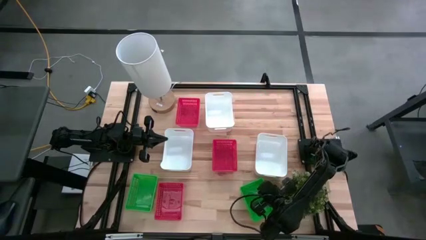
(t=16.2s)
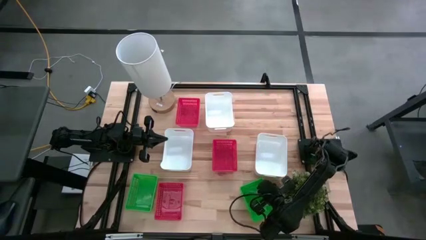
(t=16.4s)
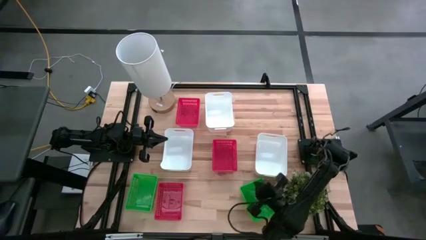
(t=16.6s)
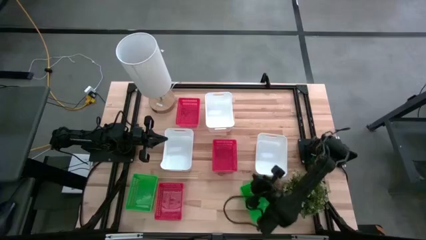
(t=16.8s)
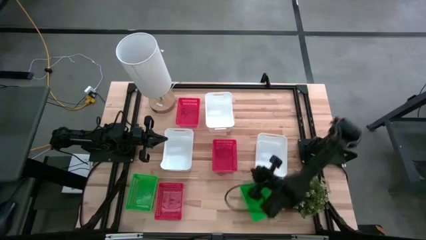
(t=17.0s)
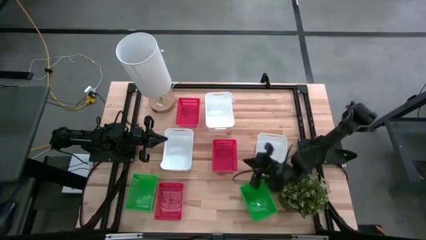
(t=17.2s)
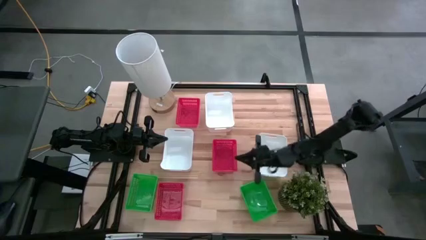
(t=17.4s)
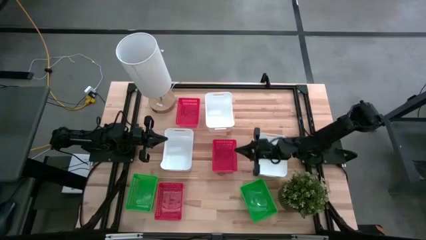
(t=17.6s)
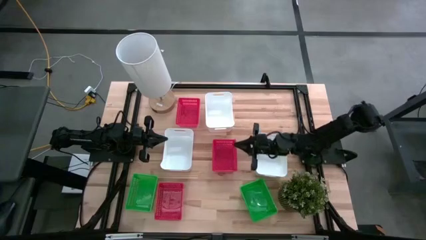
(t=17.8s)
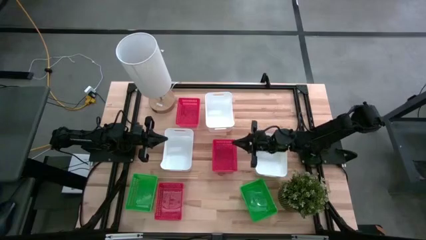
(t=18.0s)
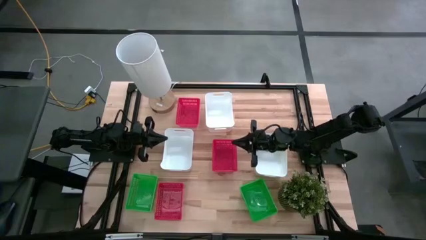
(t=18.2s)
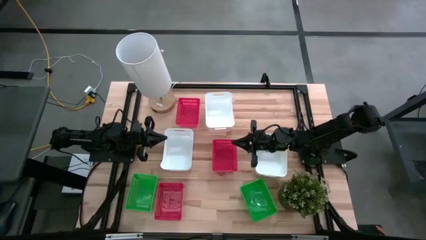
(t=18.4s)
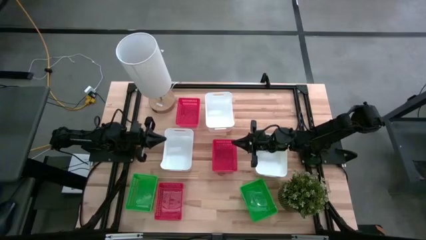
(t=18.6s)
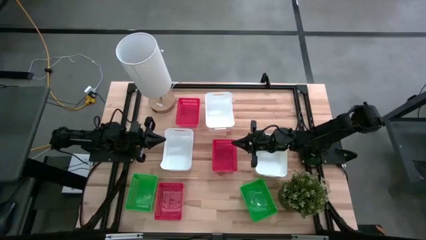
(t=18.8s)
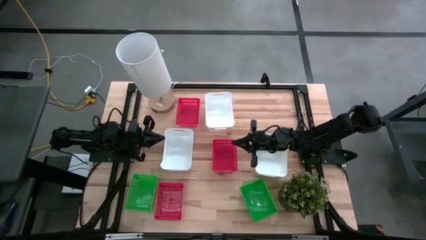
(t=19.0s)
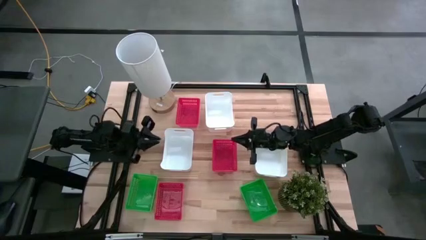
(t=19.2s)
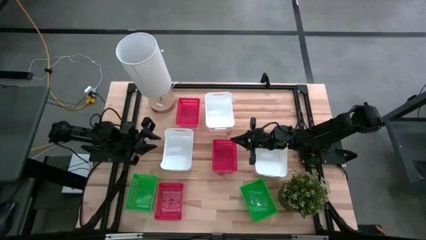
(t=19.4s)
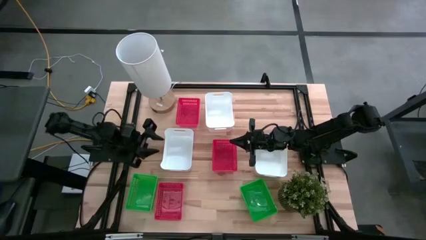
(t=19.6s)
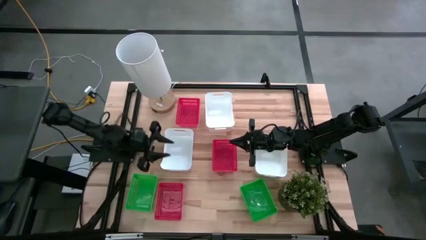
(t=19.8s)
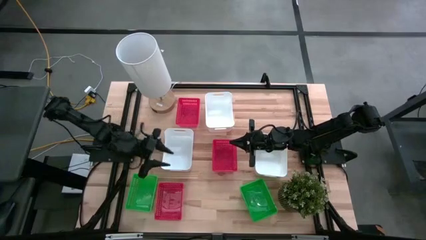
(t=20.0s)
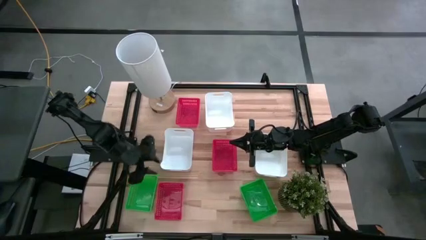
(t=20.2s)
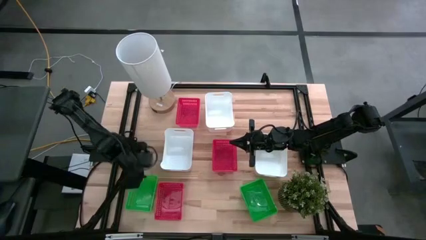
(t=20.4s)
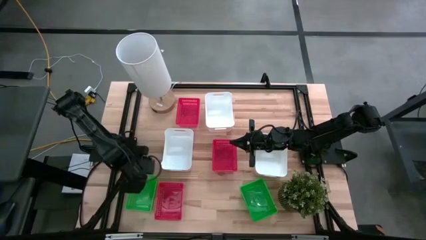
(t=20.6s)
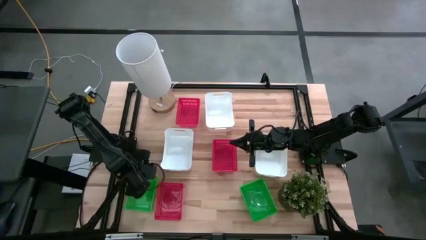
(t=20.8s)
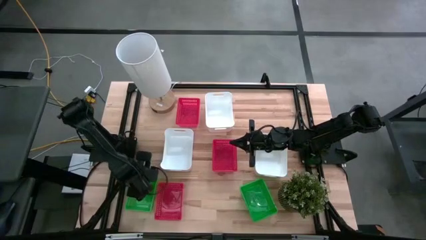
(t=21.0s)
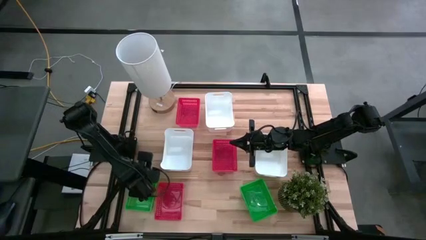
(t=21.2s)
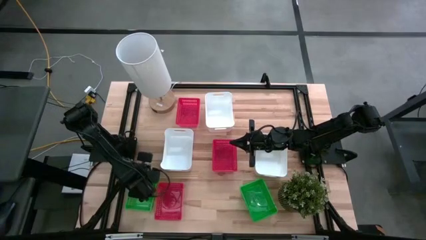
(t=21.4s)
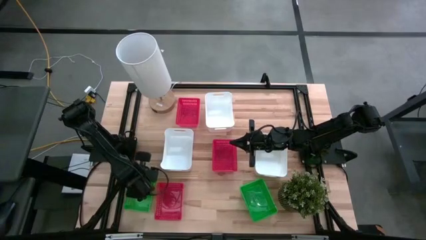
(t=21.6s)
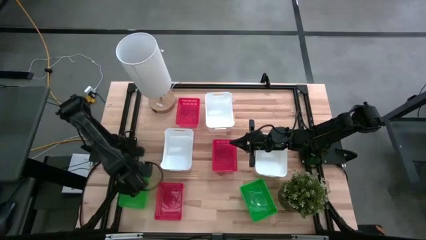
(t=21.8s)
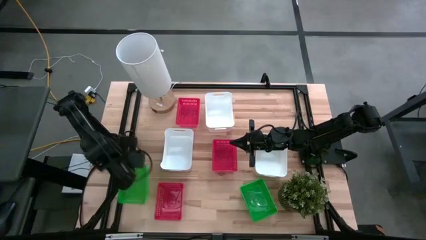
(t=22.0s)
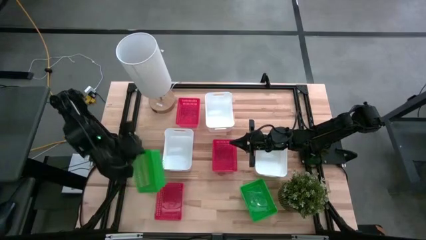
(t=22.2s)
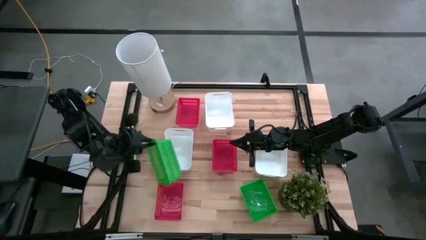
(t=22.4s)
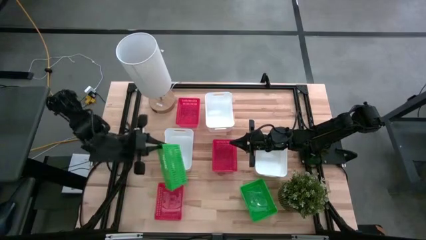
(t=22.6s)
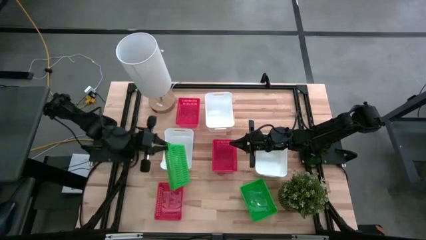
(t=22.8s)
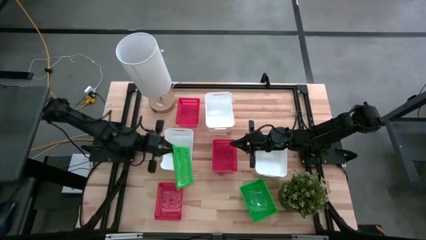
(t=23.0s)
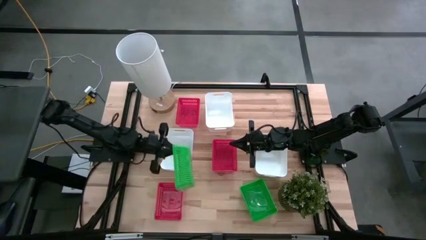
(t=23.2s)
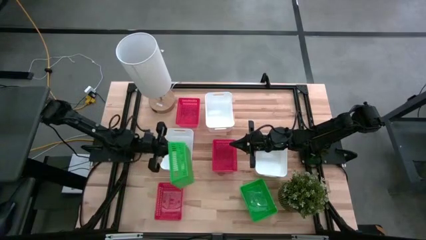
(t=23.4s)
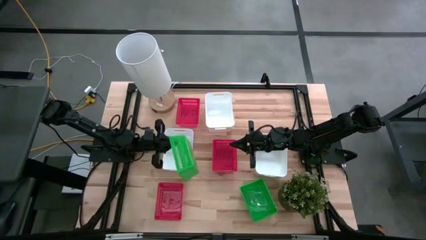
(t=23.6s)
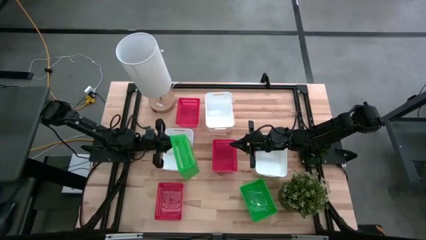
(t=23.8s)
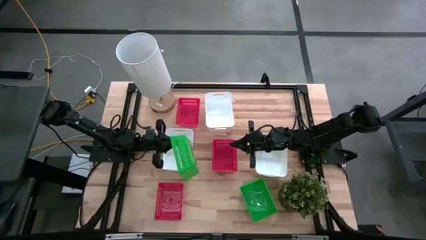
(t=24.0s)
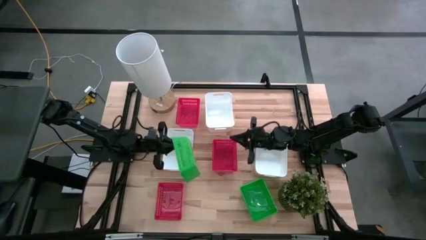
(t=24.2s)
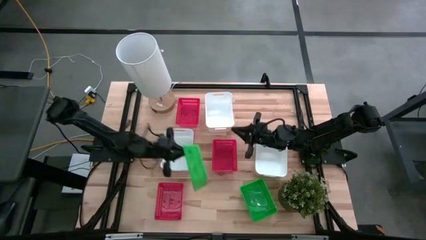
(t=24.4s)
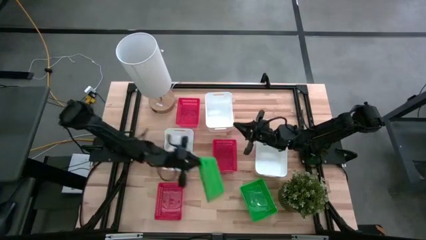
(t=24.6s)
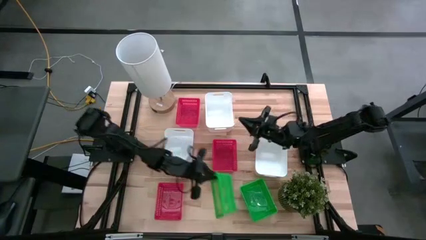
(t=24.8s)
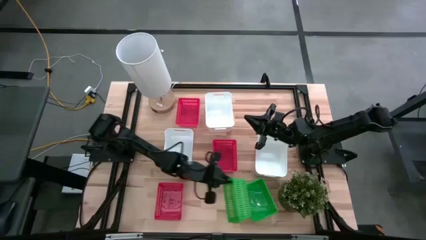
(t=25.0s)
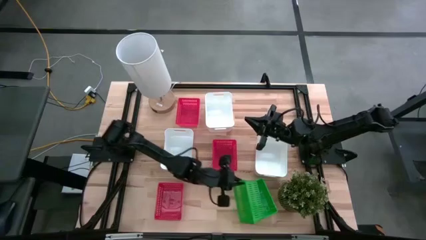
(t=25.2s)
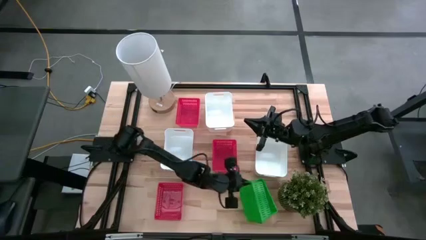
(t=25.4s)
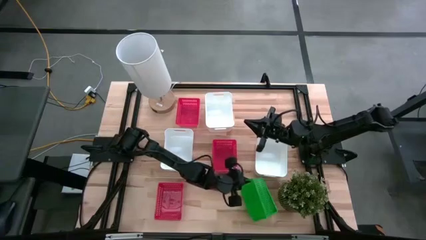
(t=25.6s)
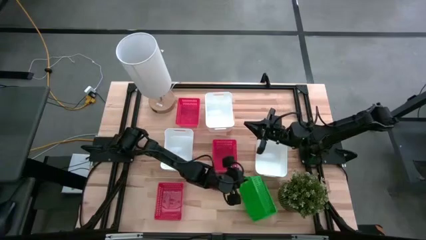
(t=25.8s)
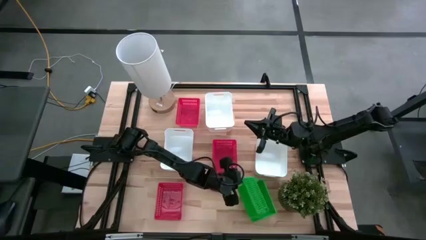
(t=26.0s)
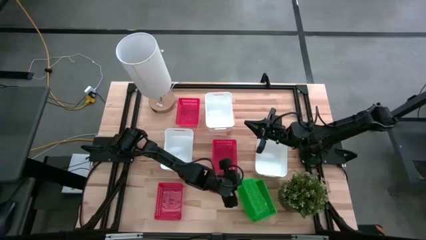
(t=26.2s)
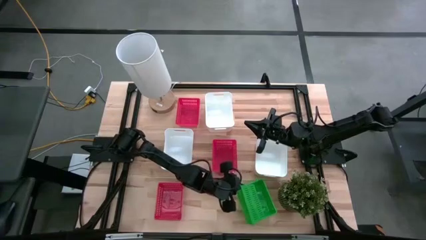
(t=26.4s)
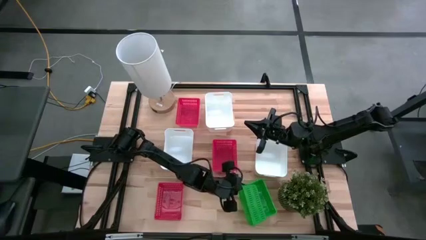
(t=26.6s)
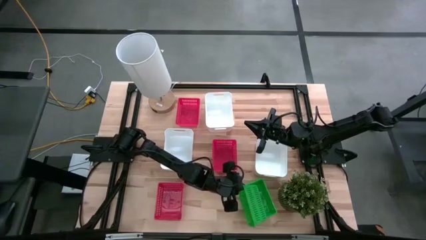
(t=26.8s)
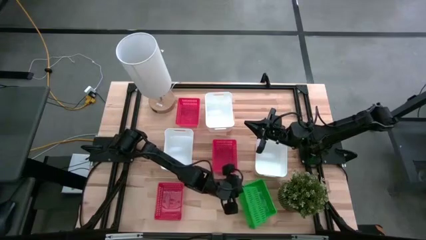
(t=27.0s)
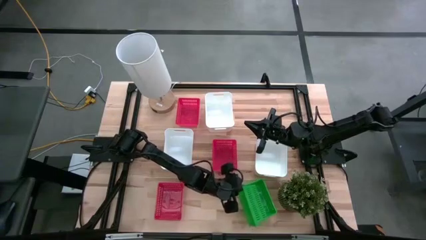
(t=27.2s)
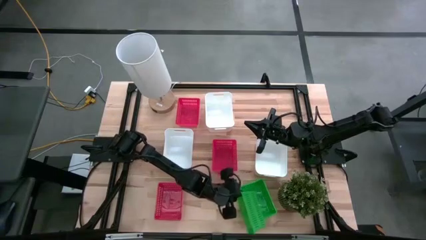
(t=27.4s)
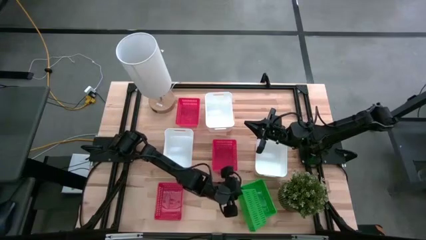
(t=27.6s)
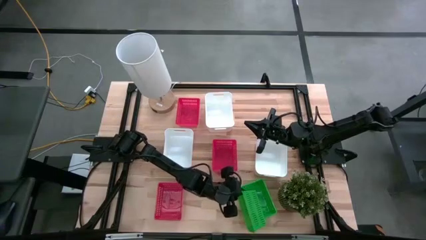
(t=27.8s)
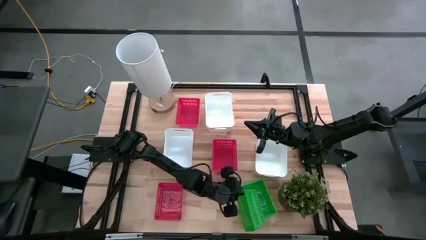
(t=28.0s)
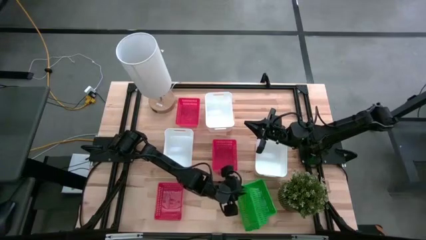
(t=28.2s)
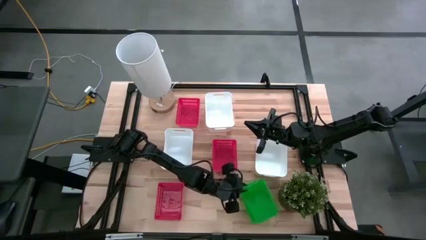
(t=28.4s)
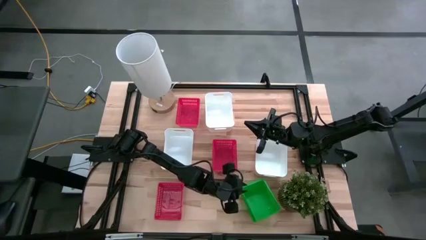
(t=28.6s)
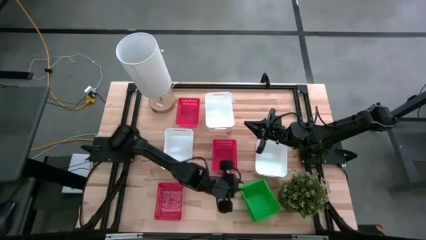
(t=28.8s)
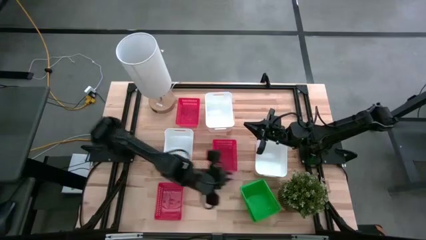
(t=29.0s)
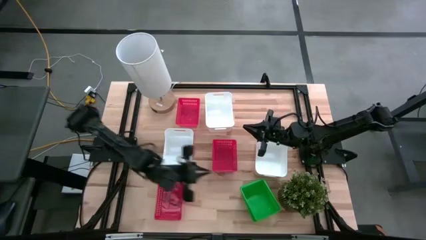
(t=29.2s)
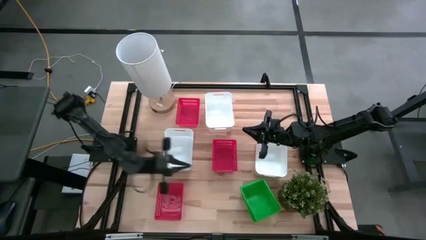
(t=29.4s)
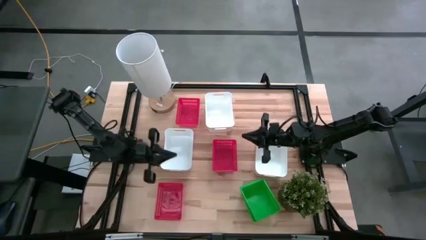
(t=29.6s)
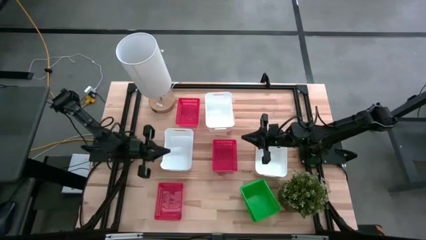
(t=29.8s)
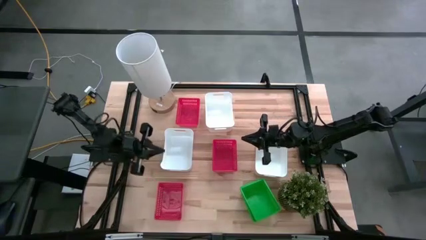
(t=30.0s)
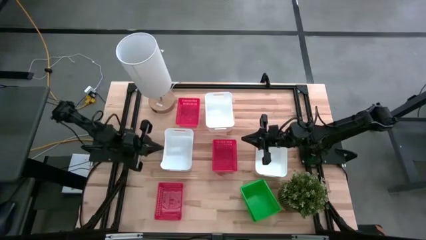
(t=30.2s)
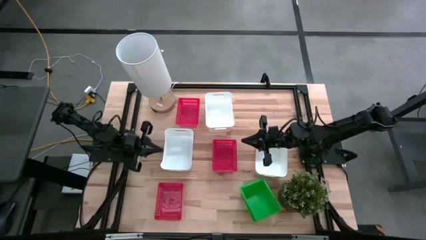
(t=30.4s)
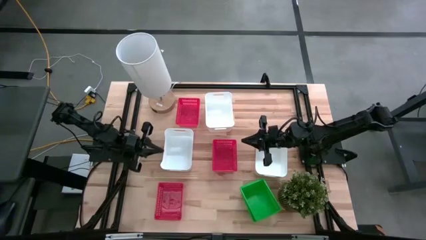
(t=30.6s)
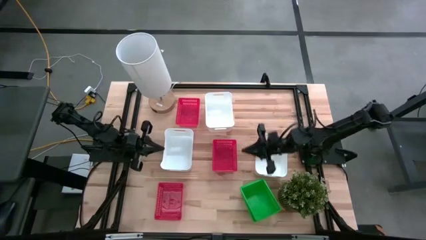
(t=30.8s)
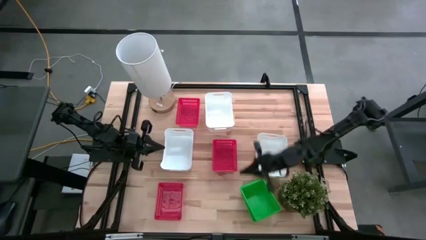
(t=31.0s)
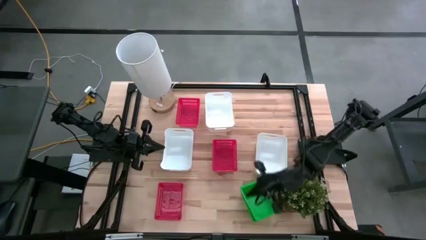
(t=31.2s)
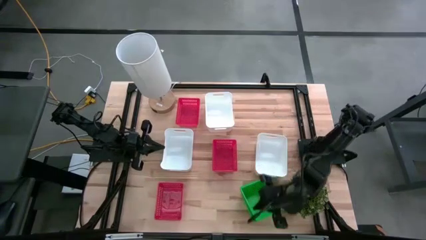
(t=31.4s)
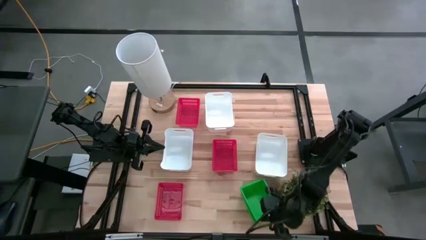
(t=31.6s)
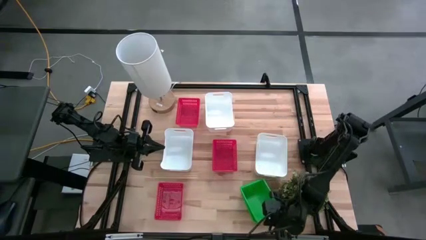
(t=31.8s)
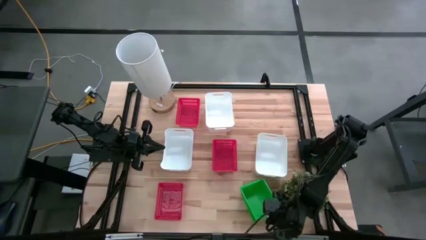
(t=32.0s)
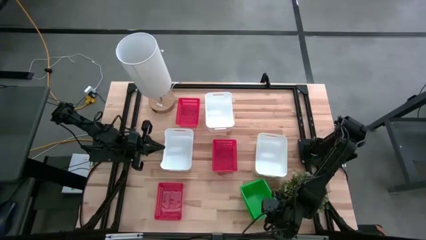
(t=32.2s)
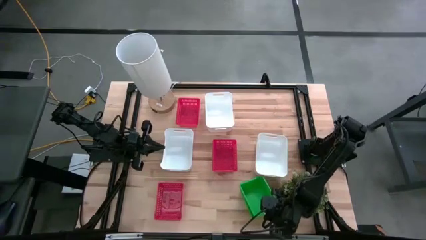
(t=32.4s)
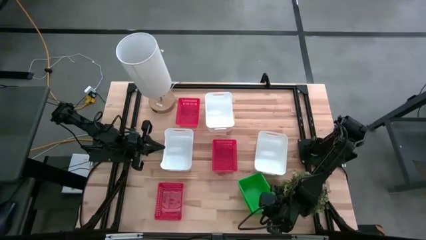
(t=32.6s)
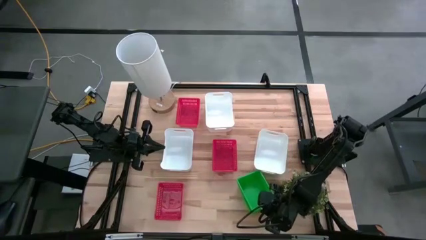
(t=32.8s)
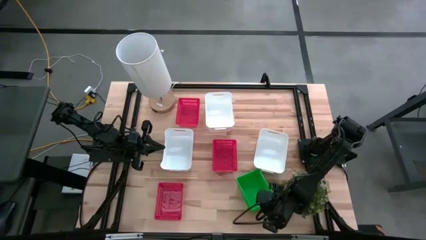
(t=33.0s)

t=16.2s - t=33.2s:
Stack the left green bin on top of the stacked green bins
